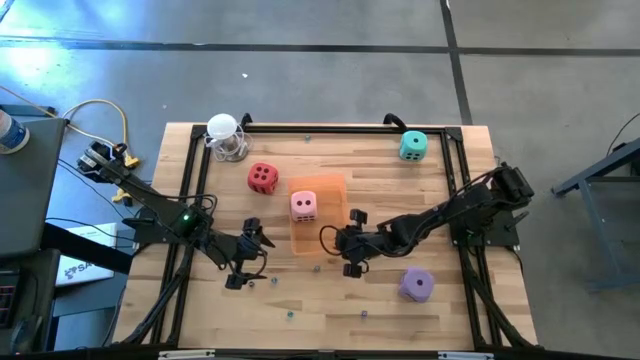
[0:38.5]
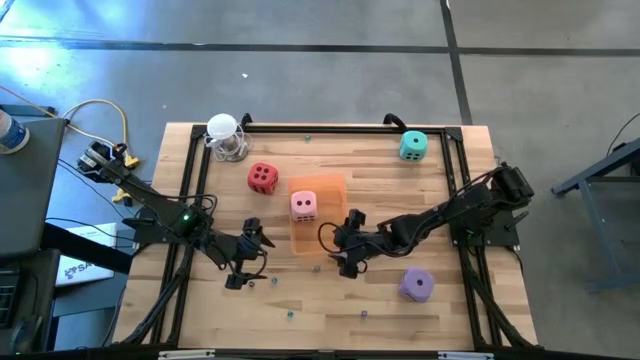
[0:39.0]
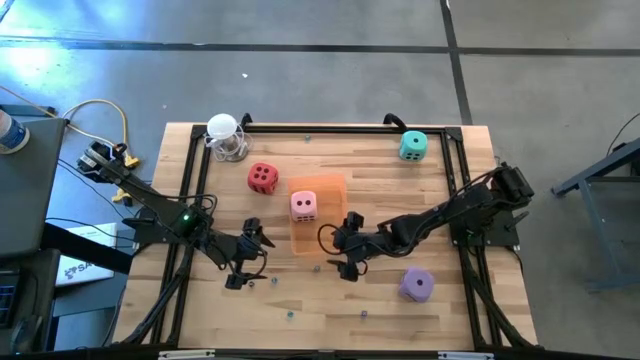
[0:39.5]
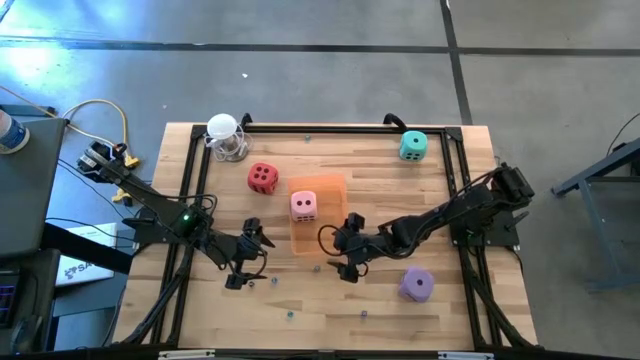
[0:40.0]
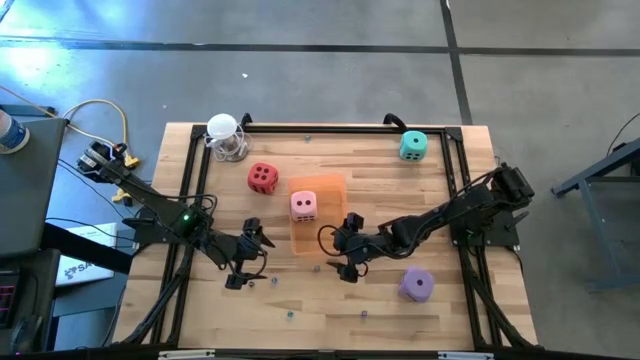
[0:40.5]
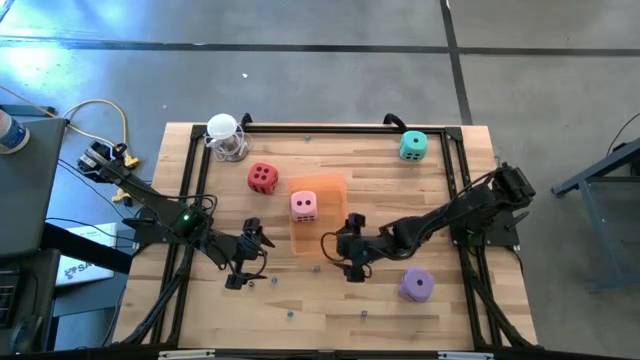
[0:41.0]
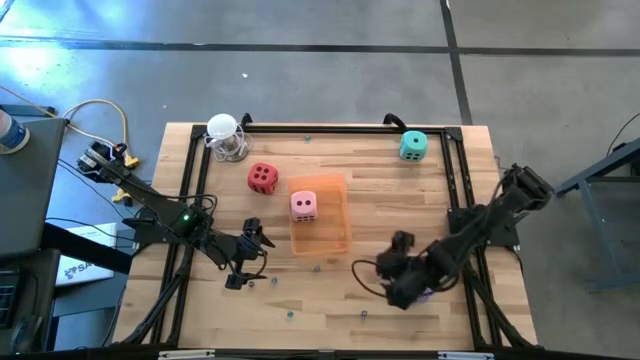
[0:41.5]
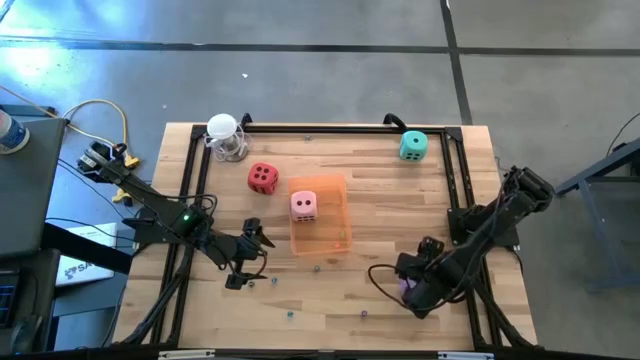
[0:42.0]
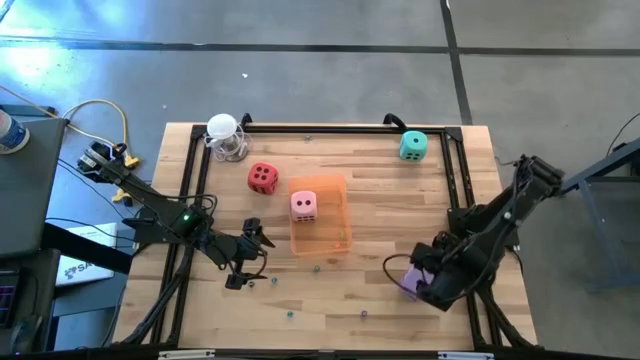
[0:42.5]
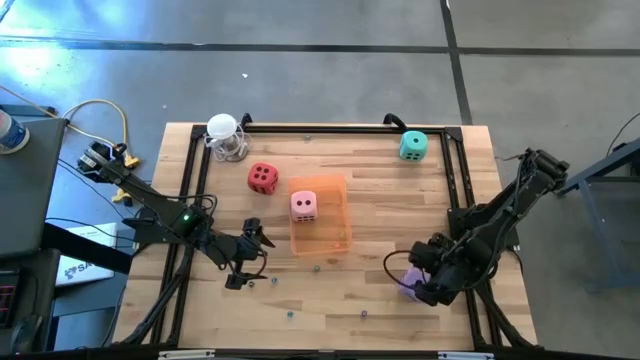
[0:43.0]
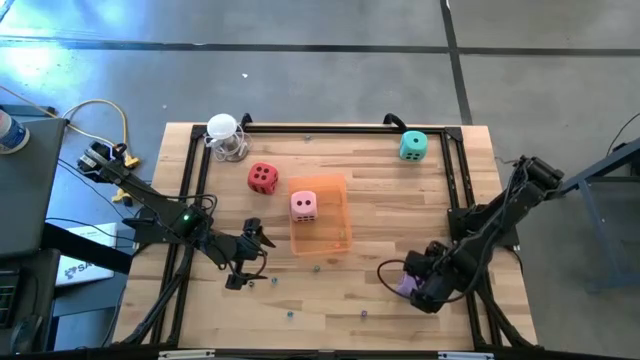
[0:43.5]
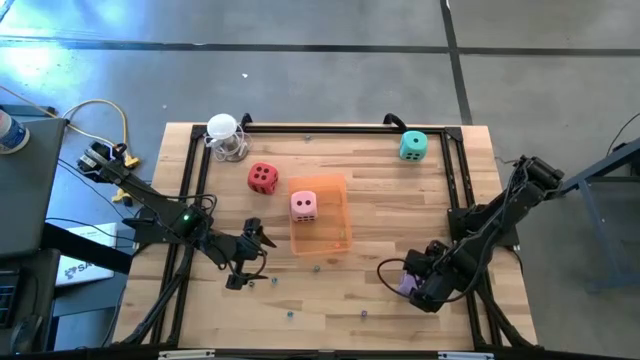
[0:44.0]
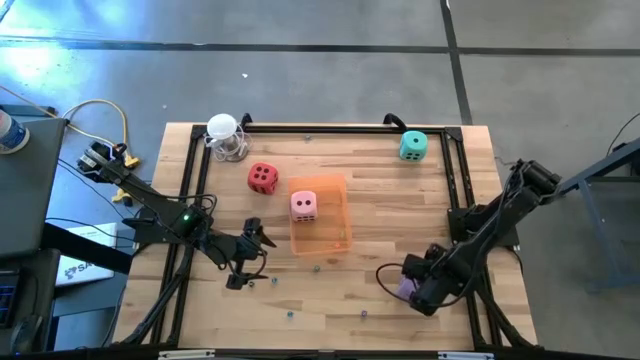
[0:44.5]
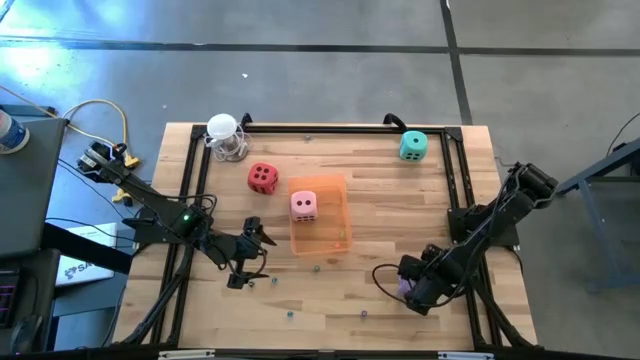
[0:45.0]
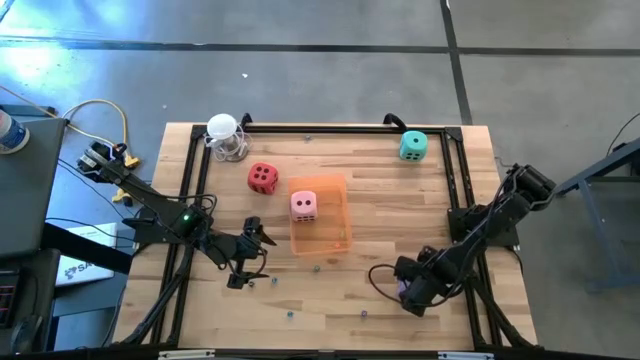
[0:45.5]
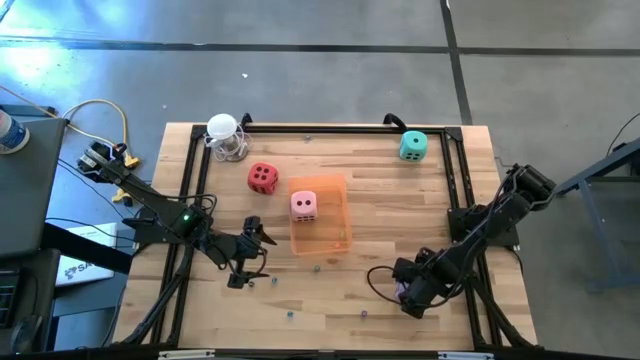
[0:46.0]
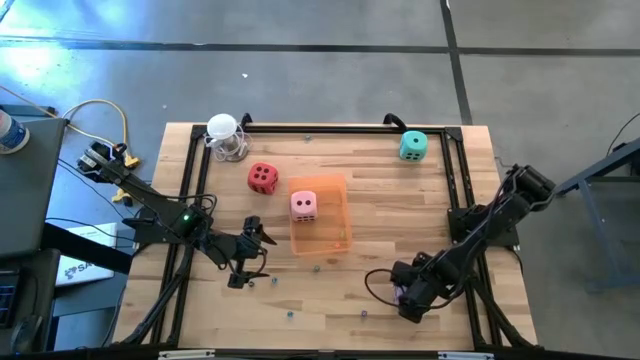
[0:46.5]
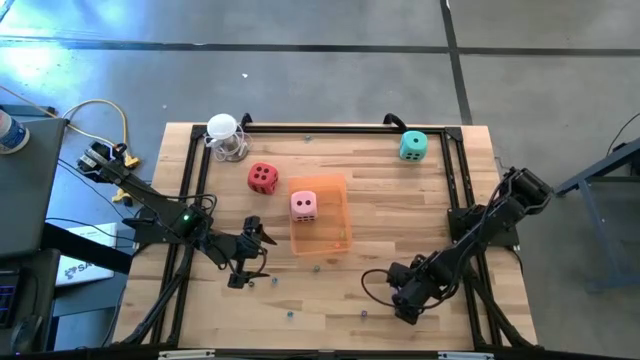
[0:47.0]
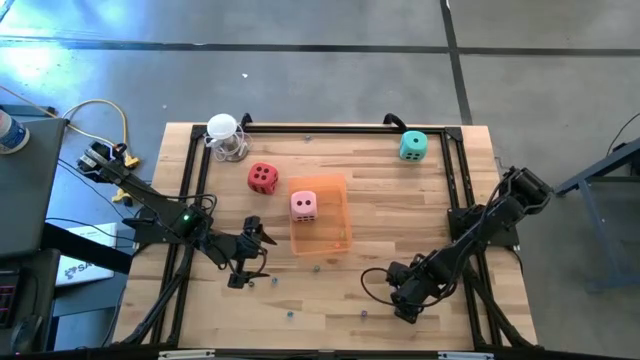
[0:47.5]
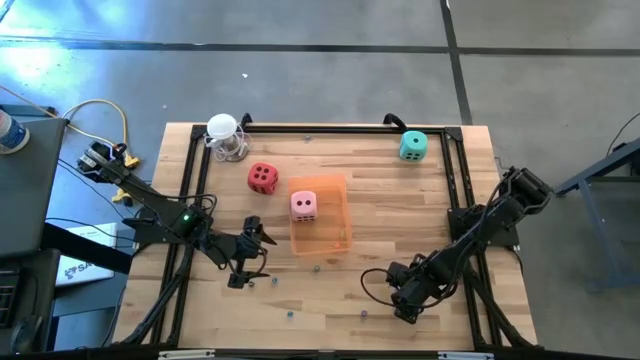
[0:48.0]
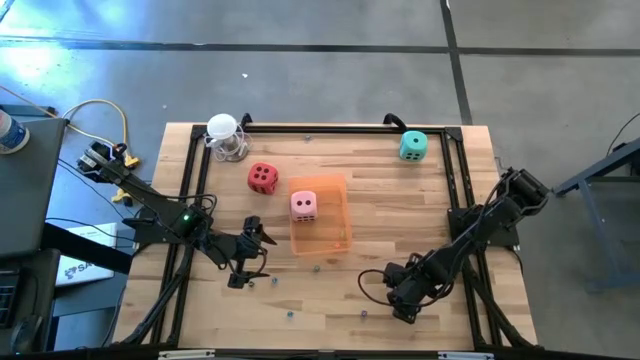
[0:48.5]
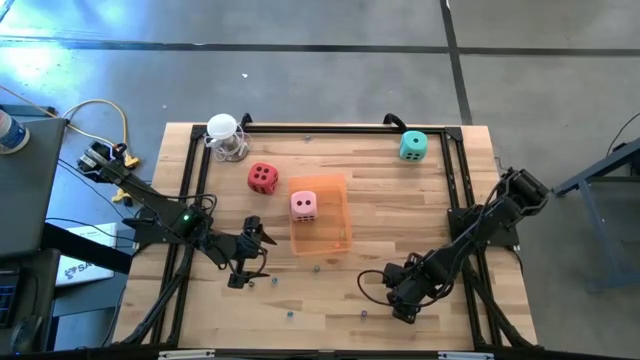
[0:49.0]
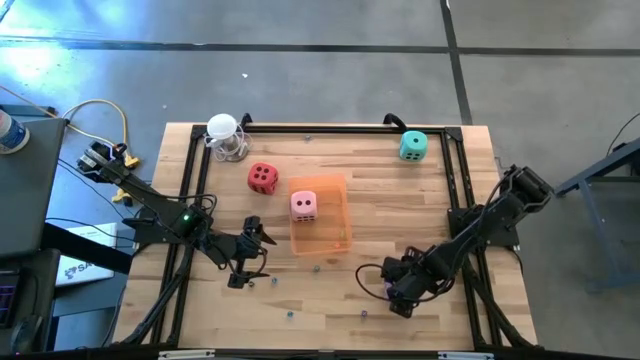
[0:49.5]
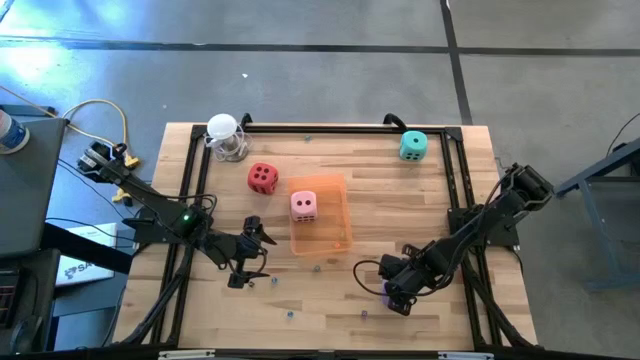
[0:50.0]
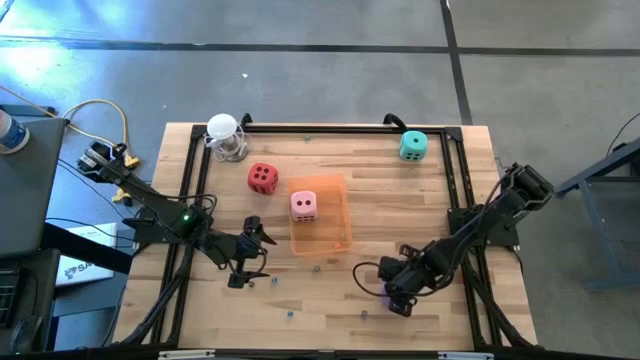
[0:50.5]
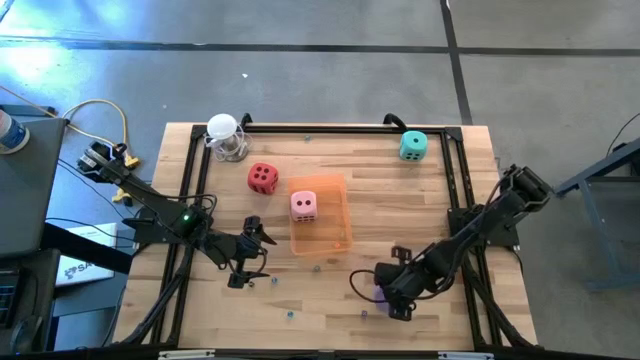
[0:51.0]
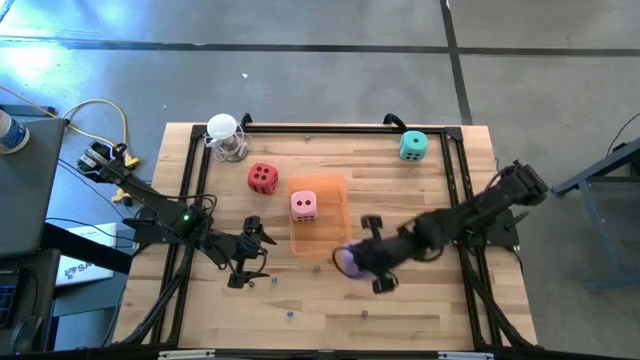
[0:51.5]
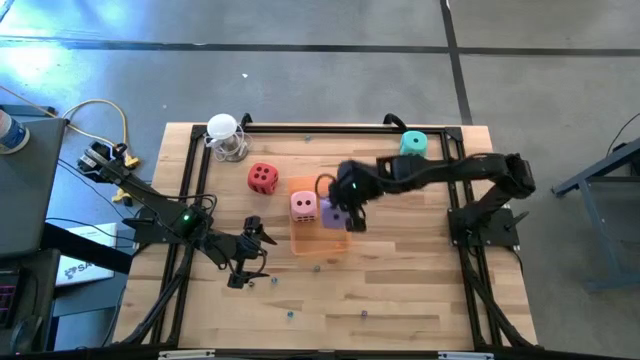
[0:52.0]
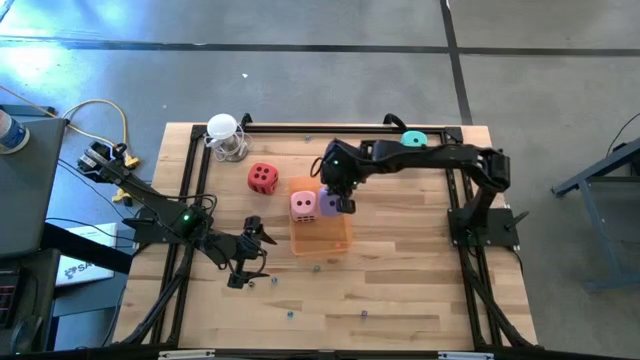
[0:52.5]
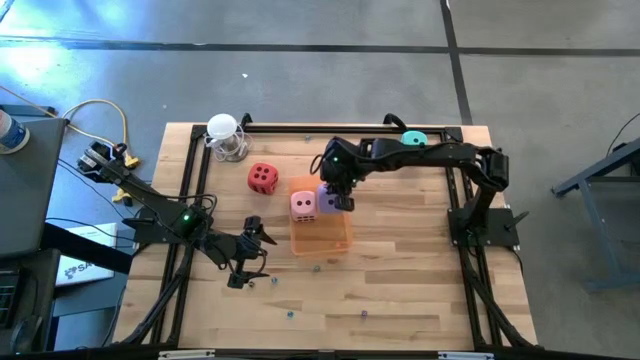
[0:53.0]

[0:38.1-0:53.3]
Task: Pick & Place Dice
Put the large purple die into the orange bin

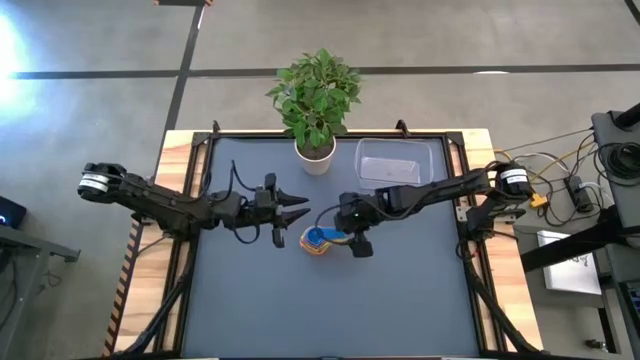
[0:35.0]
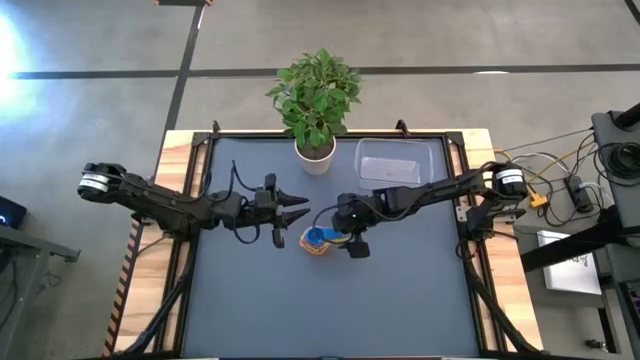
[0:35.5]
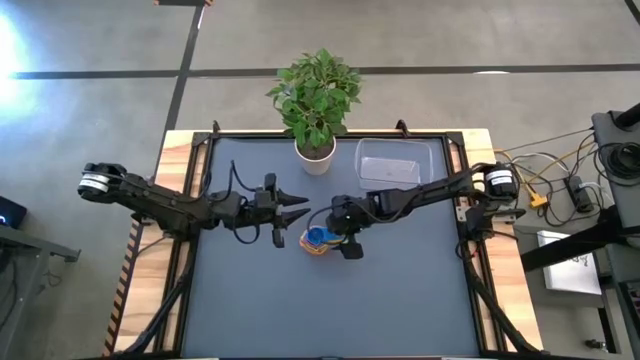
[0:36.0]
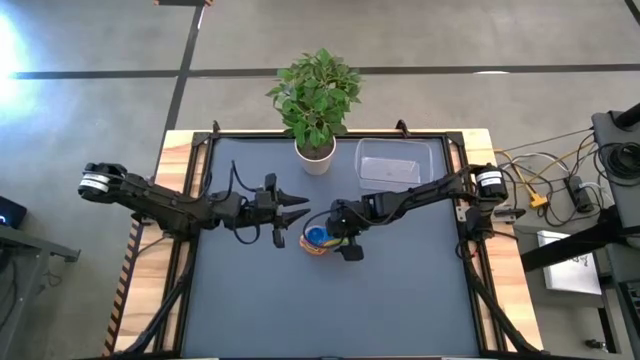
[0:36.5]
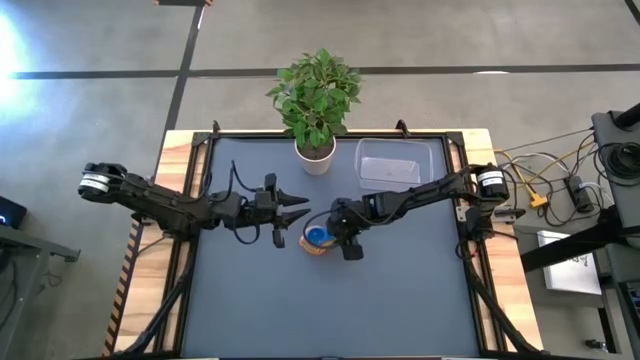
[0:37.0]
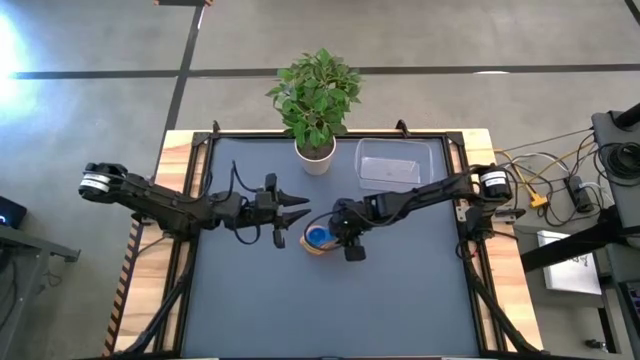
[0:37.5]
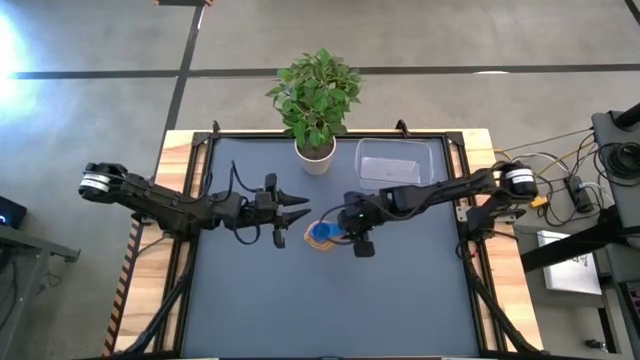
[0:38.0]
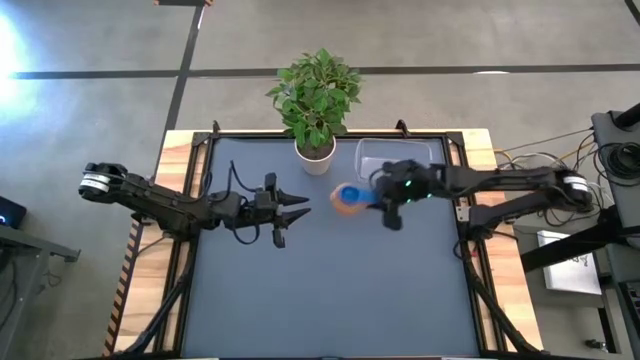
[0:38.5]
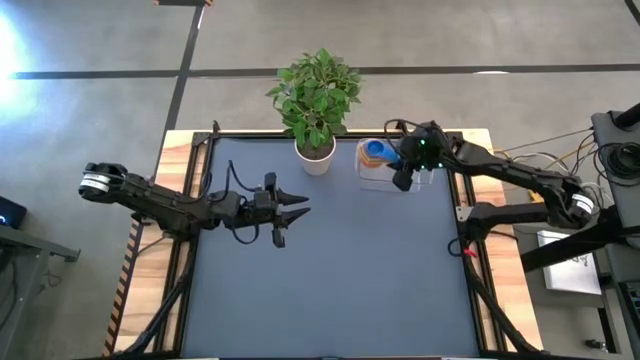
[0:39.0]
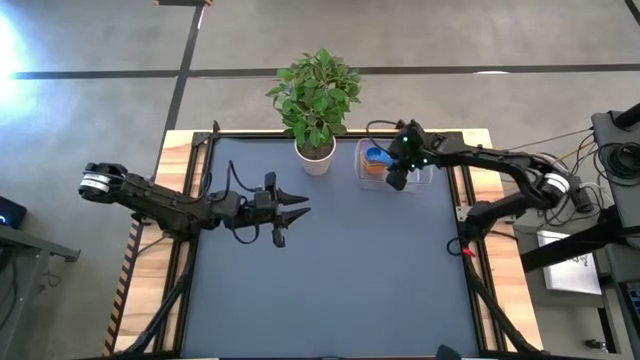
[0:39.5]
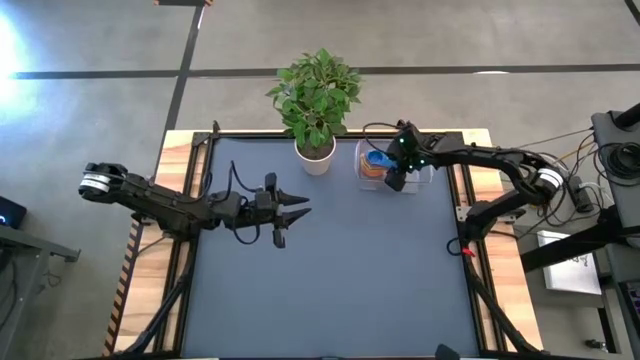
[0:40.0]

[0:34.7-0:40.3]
Task: Nest measuring cups in basket
Put the stacked measuring cups into the transparent bin
